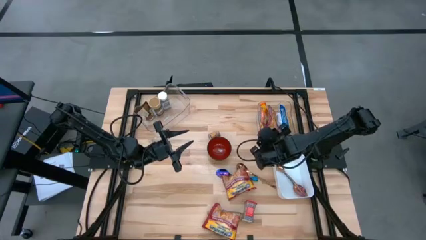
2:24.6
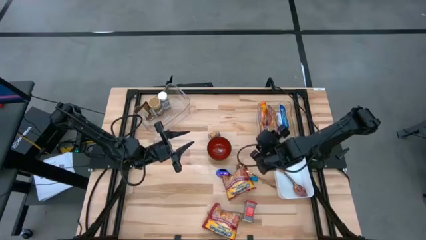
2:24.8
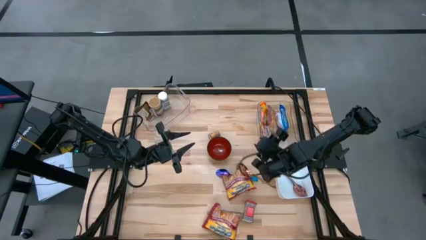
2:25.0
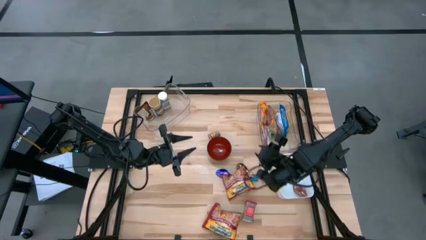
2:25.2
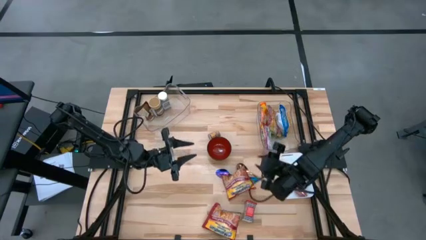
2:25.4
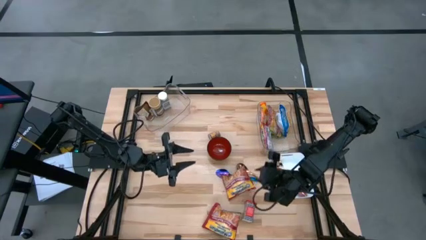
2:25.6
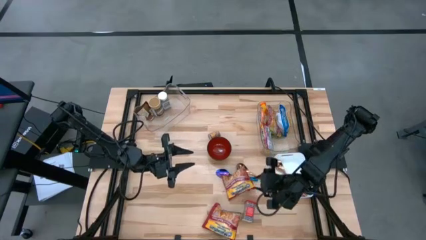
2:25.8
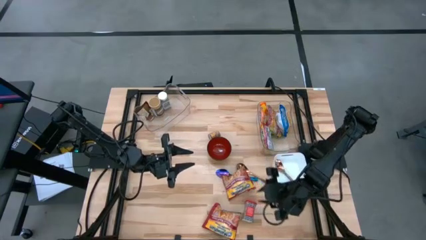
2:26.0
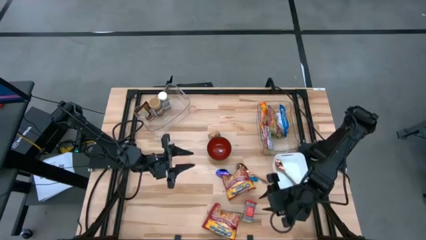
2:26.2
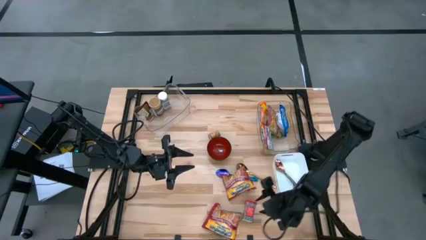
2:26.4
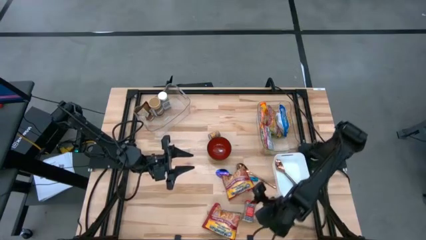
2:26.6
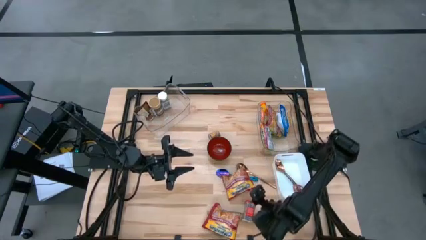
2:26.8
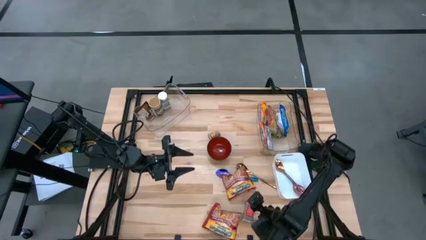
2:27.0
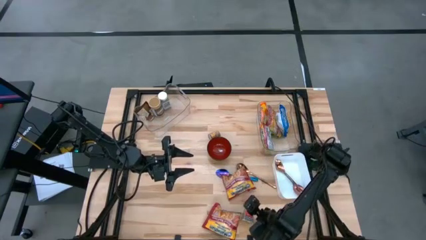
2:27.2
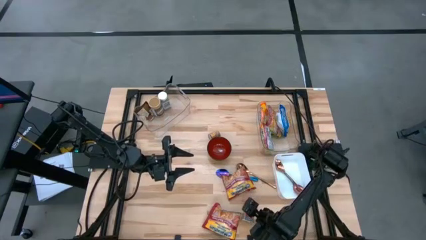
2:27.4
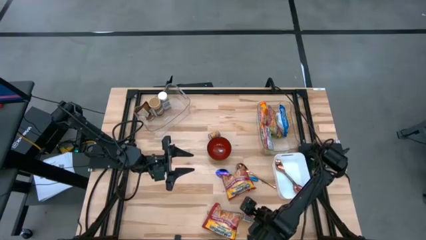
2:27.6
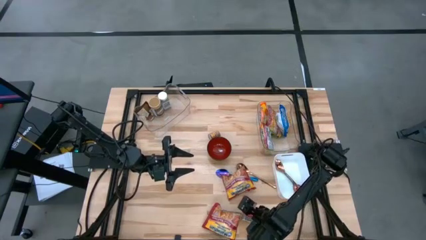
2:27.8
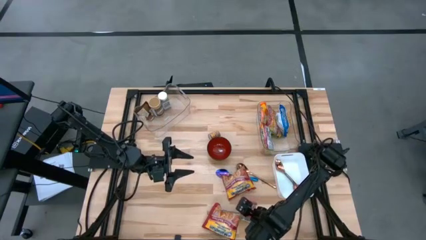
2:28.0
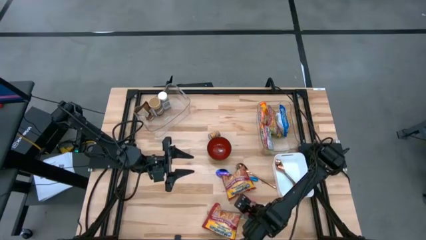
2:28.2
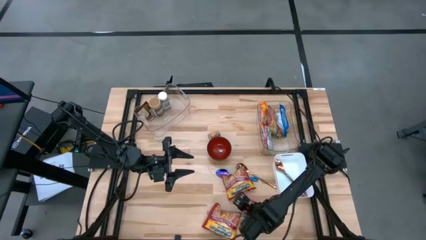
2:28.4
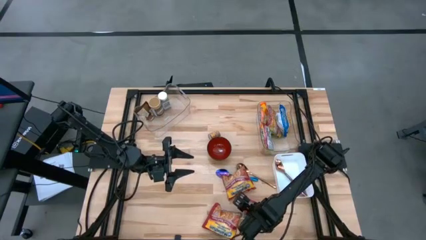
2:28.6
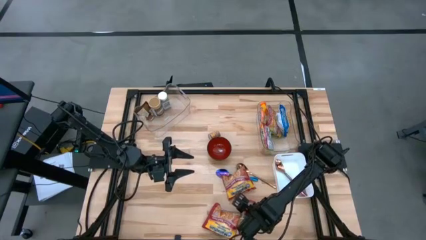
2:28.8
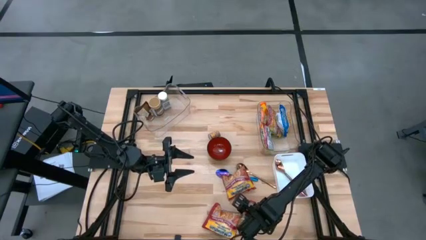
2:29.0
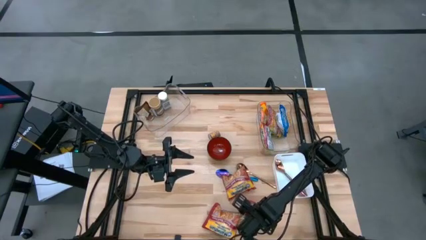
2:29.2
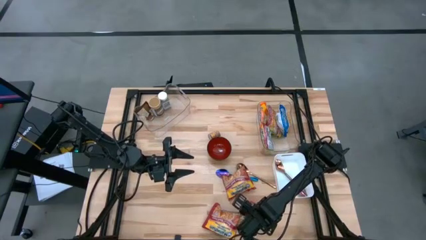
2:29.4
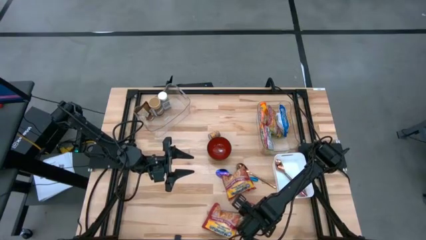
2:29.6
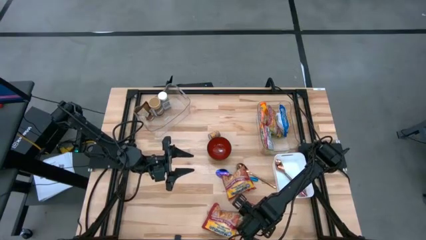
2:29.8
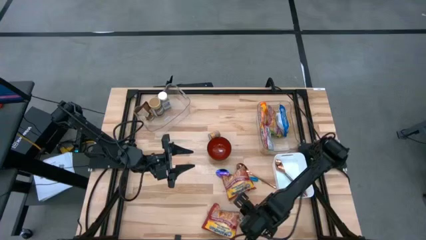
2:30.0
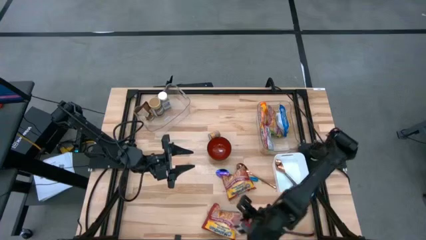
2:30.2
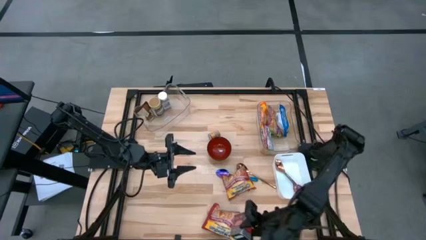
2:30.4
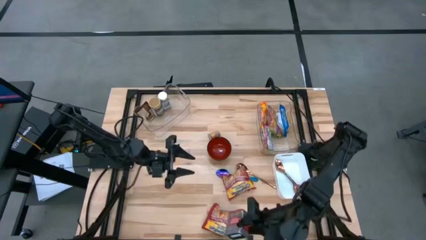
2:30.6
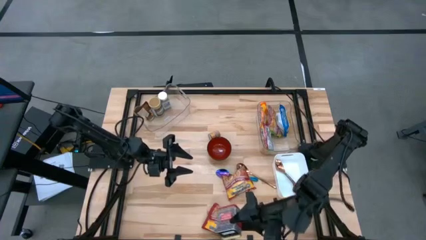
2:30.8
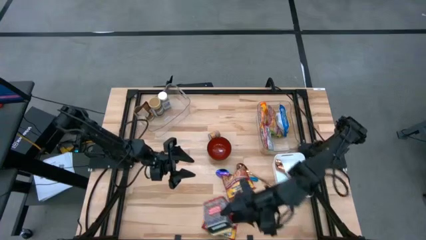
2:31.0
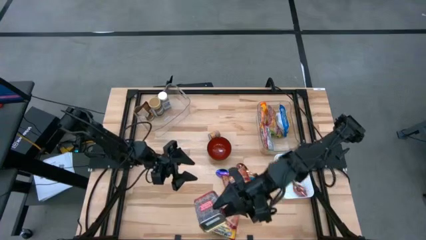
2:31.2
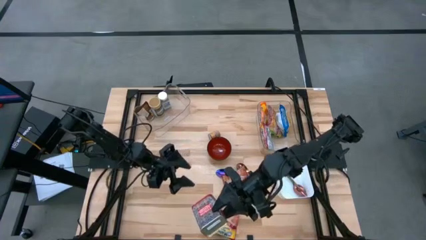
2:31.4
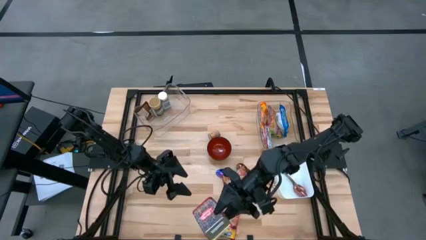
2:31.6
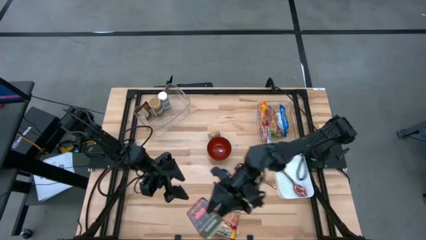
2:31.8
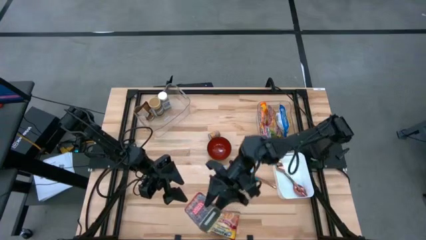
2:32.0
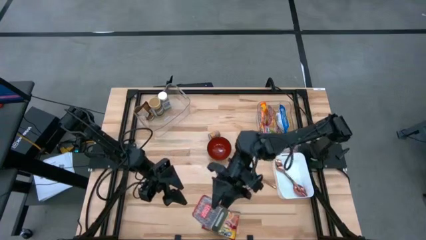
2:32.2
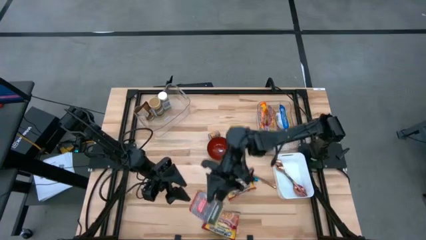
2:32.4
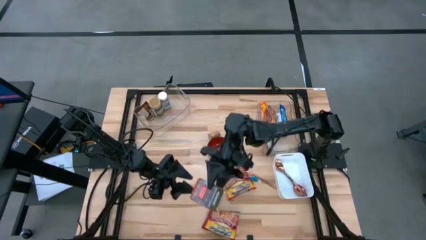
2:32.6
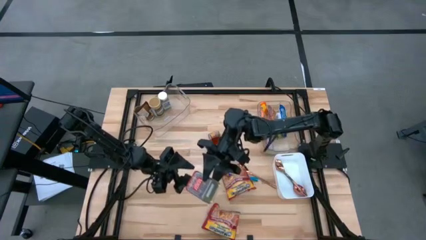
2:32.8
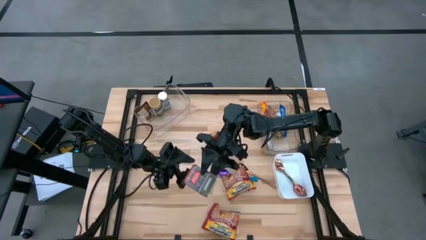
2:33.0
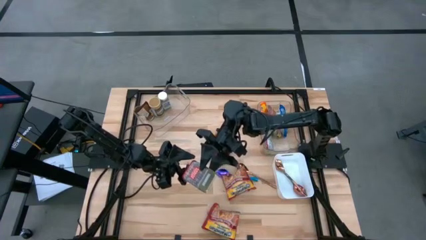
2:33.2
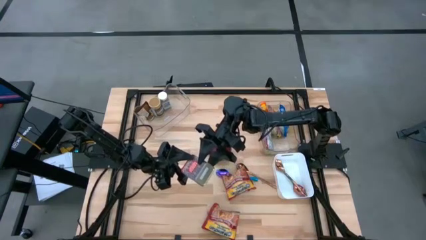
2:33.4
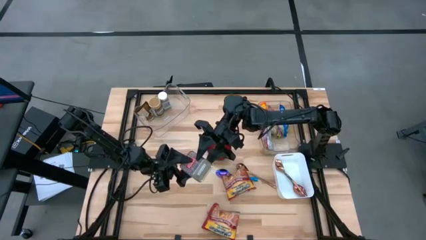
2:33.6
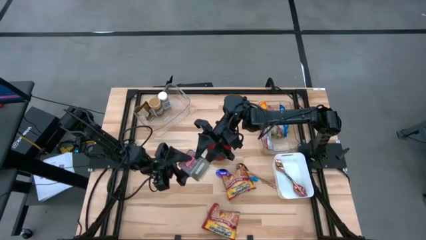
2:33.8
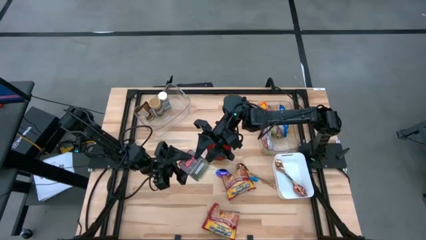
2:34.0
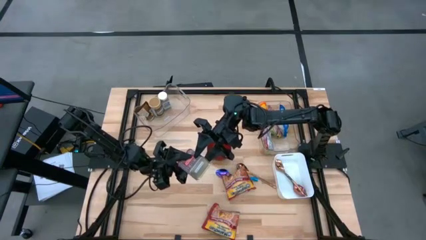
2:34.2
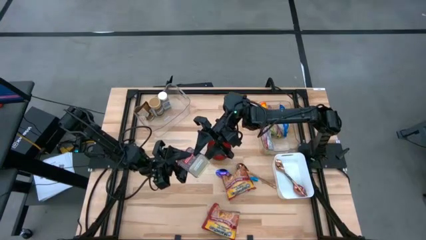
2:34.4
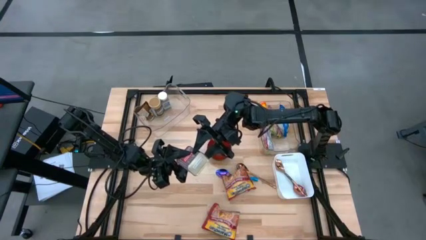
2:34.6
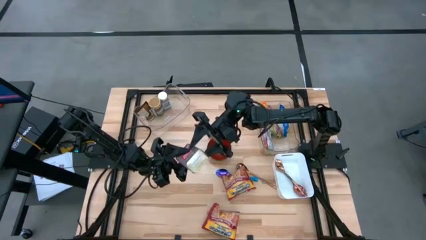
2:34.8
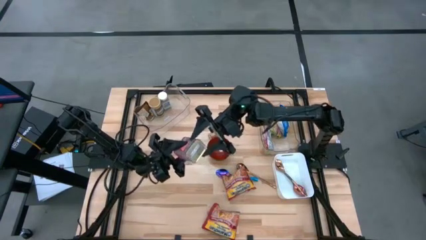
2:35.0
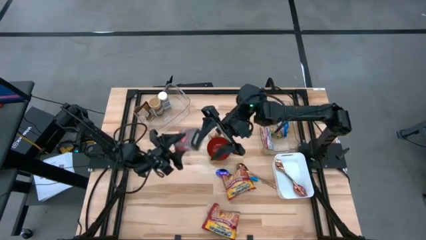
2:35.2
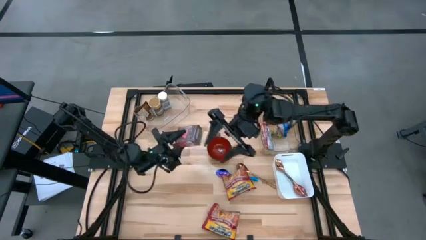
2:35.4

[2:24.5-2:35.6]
Task: Pick & Place Food Item
Put the red seasoning can into the left transparent bin

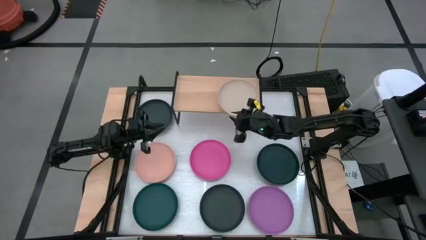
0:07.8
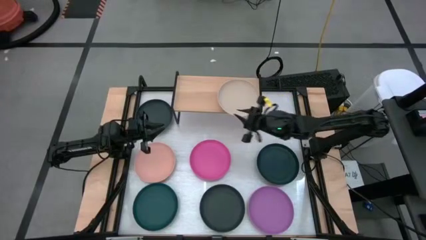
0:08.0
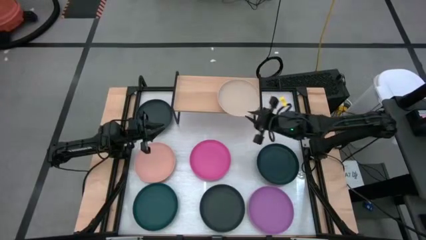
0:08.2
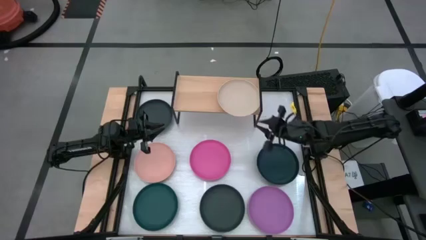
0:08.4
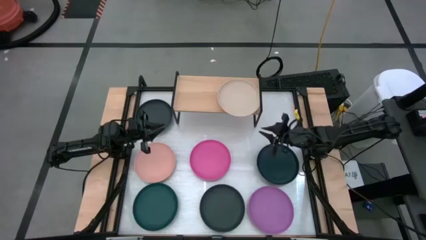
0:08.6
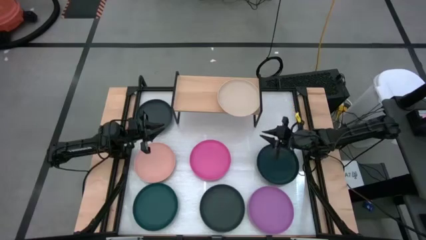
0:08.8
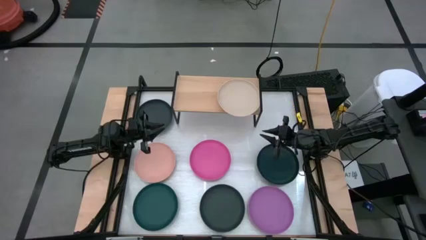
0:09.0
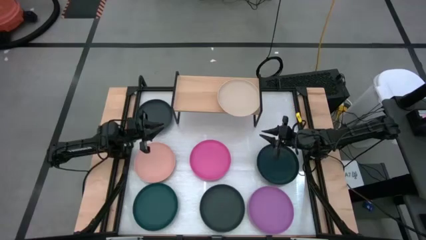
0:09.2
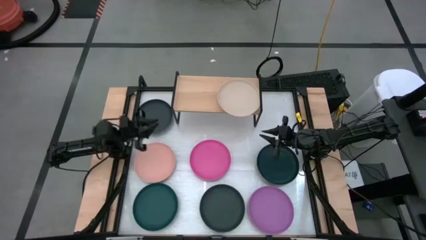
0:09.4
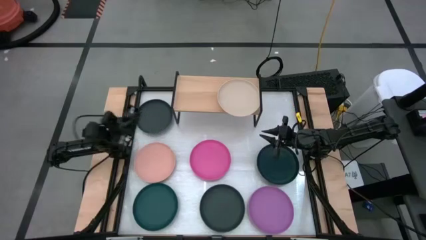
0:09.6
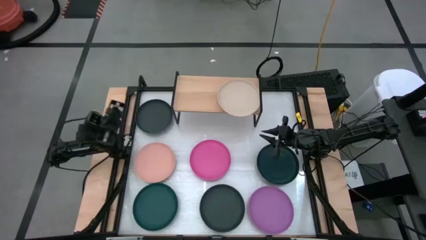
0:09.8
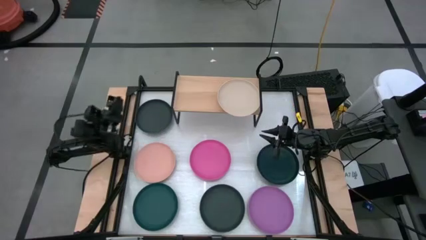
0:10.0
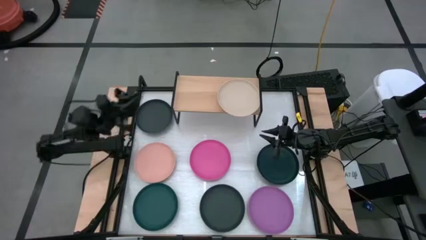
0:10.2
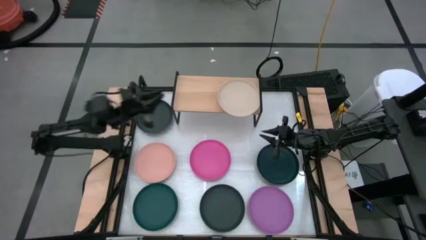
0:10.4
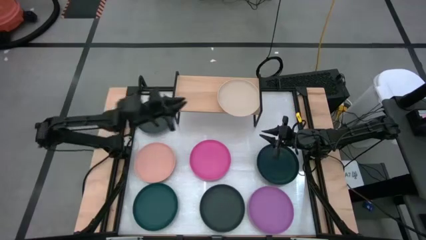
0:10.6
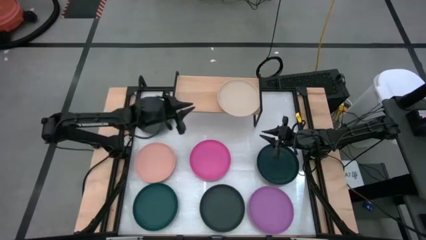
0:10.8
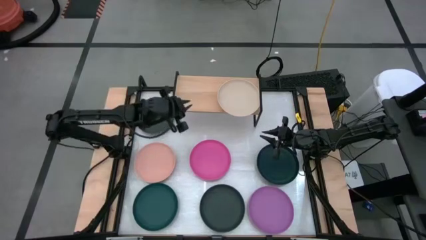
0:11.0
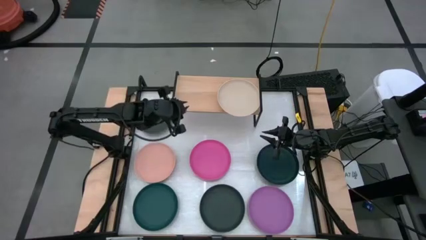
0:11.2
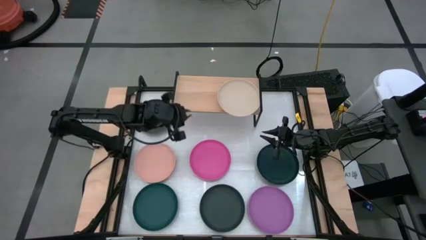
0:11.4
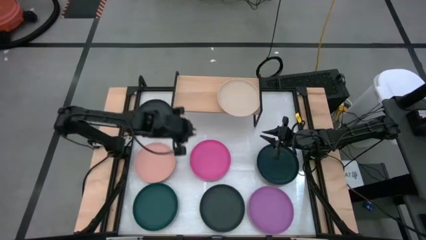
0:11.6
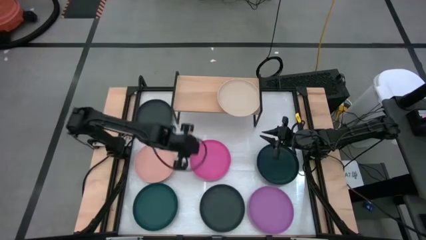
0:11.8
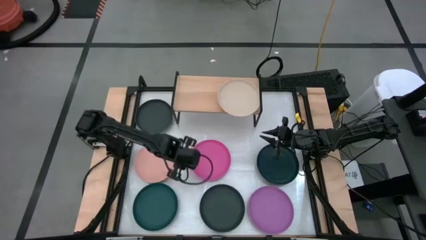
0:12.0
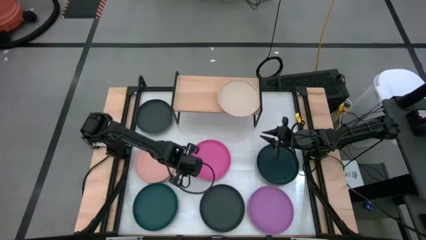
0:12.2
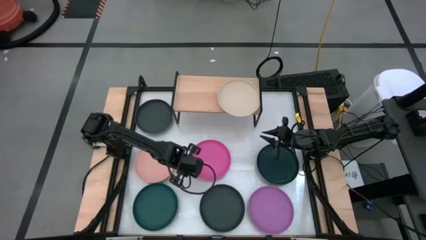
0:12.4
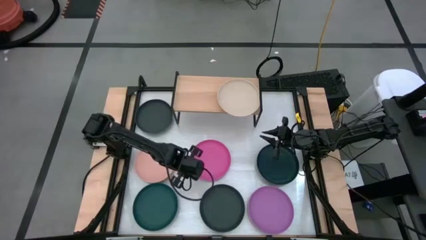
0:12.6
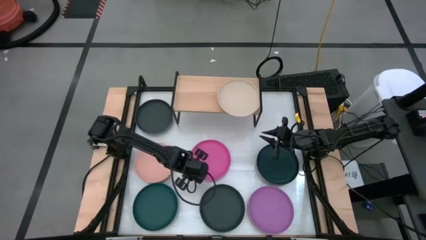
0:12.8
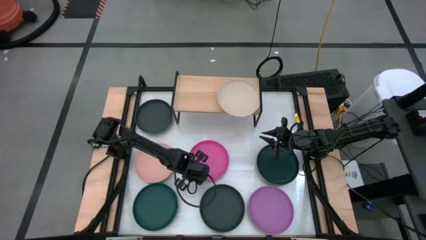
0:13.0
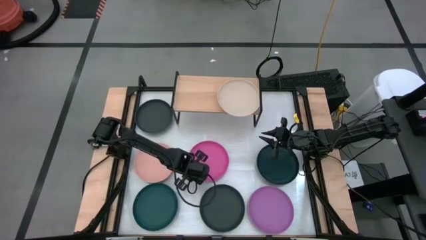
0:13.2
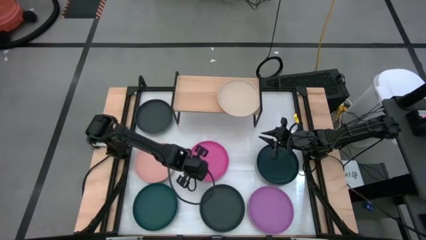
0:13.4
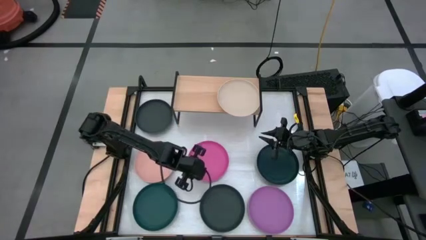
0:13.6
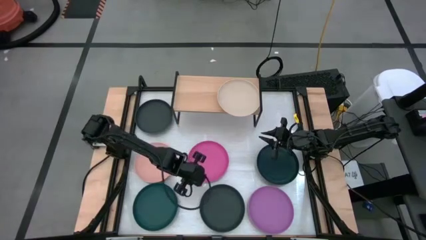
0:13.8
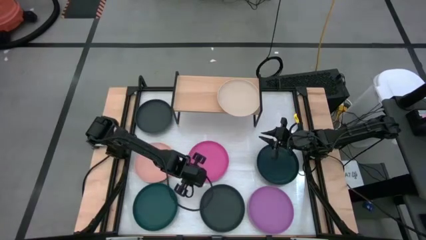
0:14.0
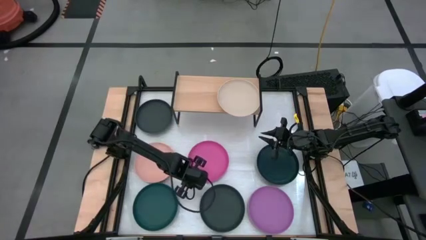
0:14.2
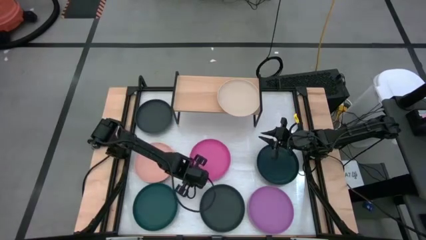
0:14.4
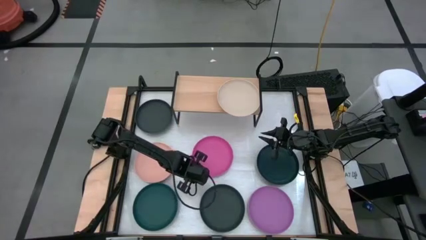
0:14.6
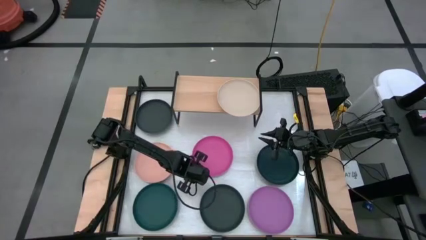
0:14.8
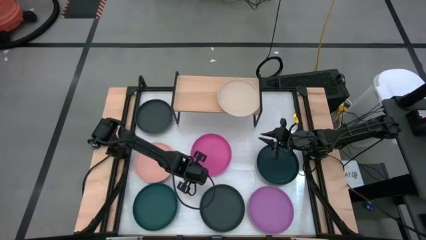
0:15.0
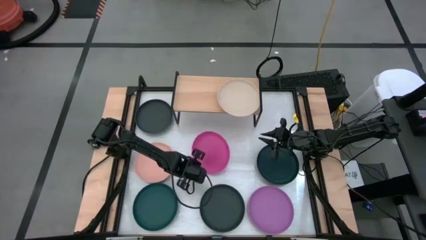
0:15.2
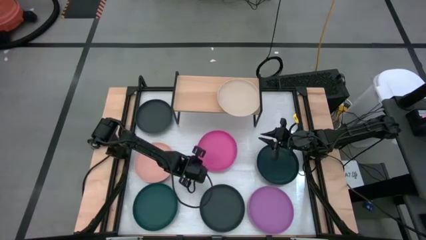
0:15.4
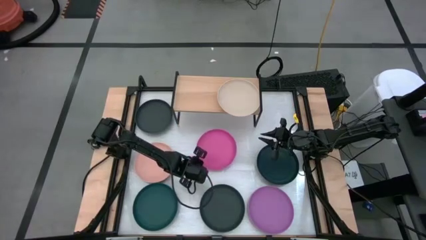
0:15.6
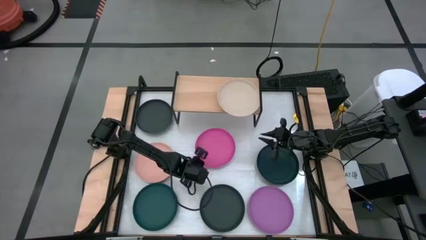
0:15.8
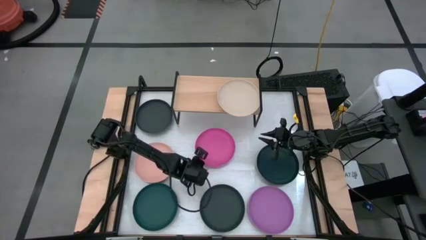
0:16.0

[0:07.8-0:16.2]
Task: Place and stack plates onto a shelf
Stack the pink plate on top of the light brown plate on the shelf
